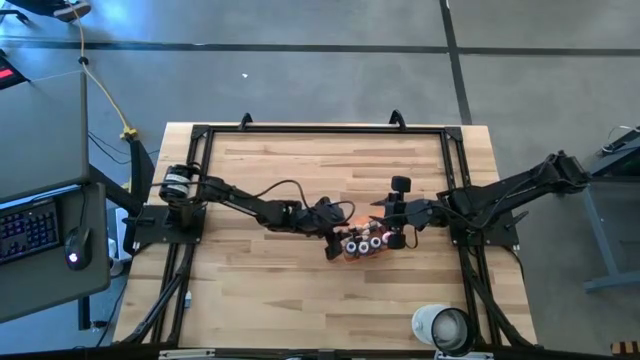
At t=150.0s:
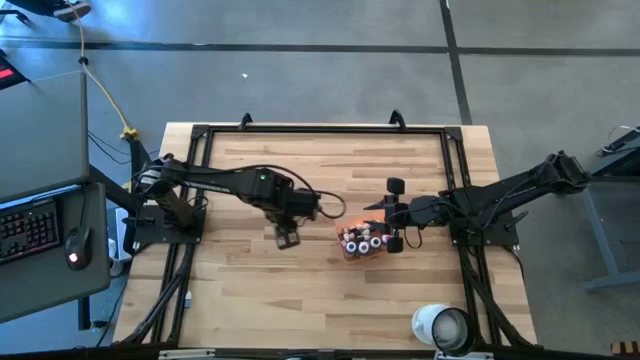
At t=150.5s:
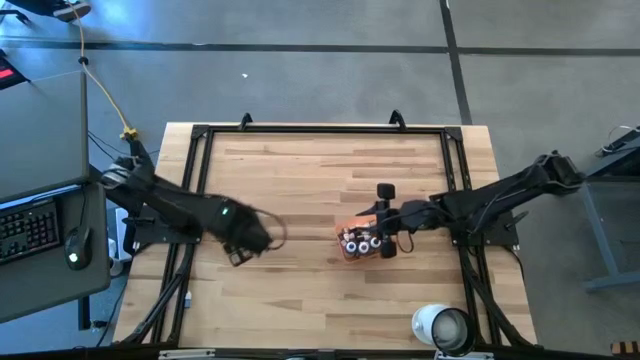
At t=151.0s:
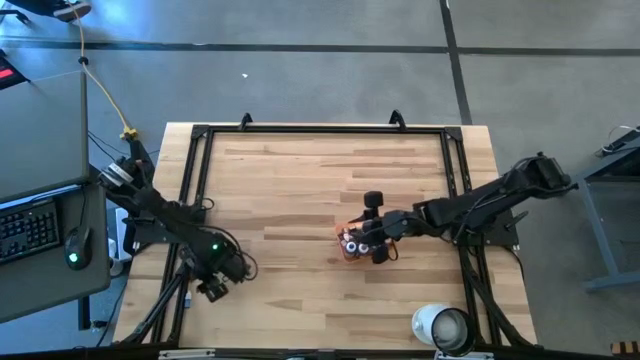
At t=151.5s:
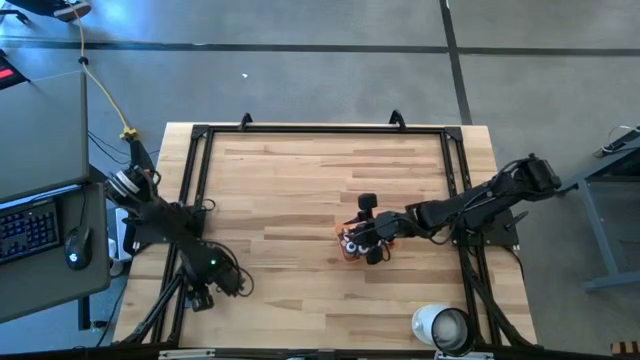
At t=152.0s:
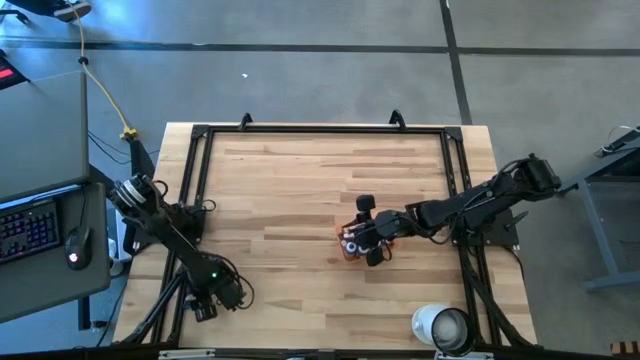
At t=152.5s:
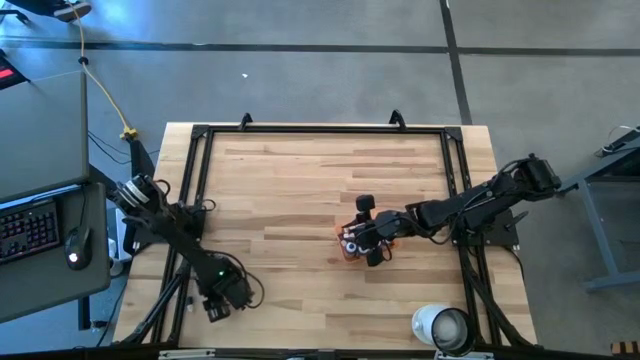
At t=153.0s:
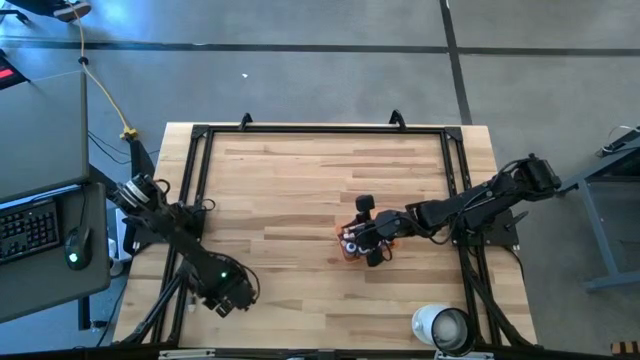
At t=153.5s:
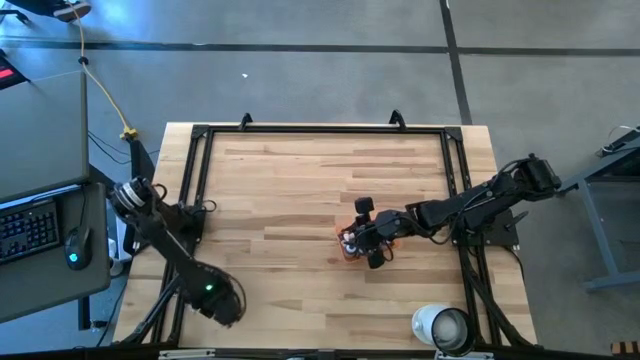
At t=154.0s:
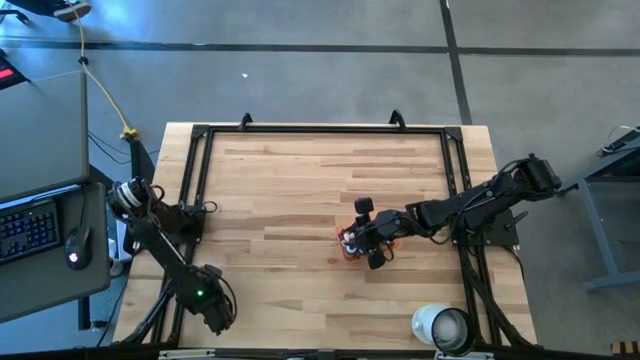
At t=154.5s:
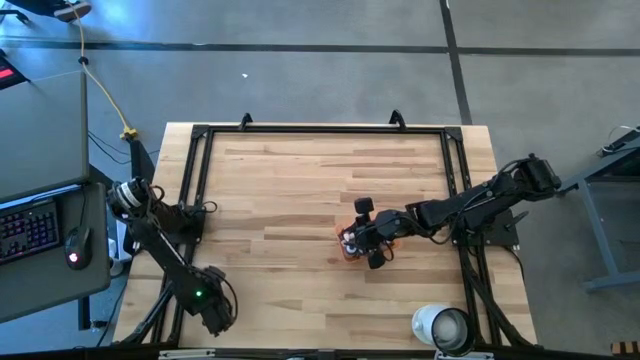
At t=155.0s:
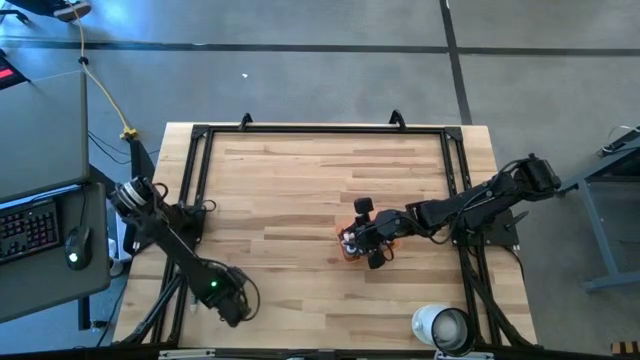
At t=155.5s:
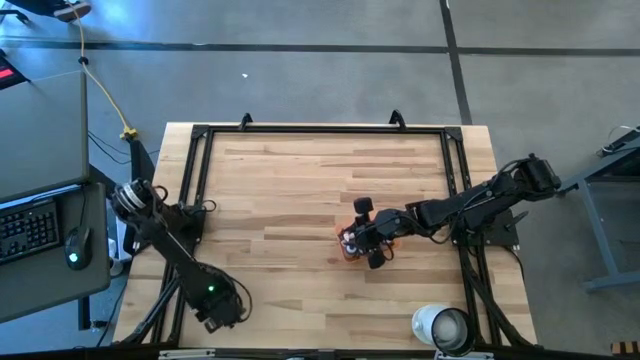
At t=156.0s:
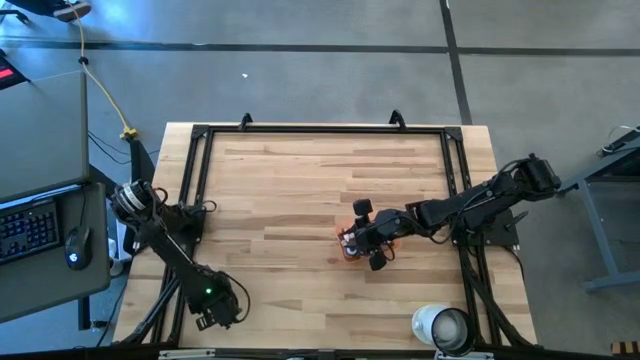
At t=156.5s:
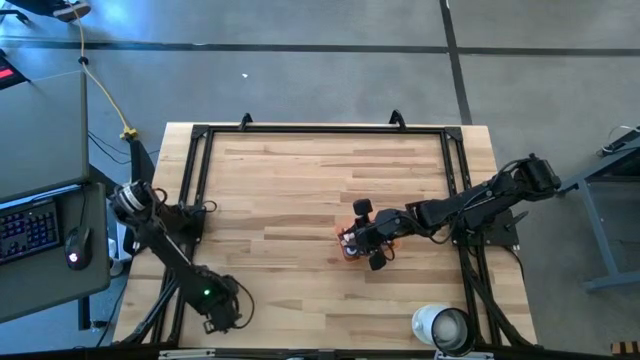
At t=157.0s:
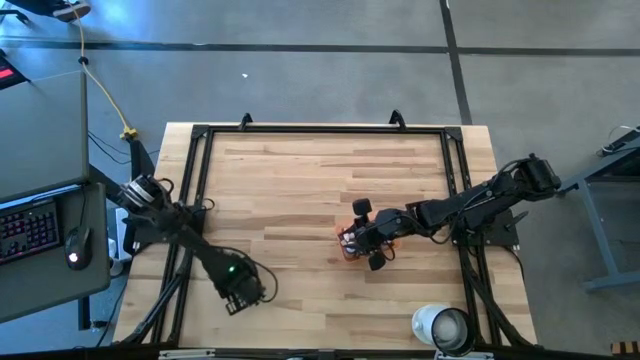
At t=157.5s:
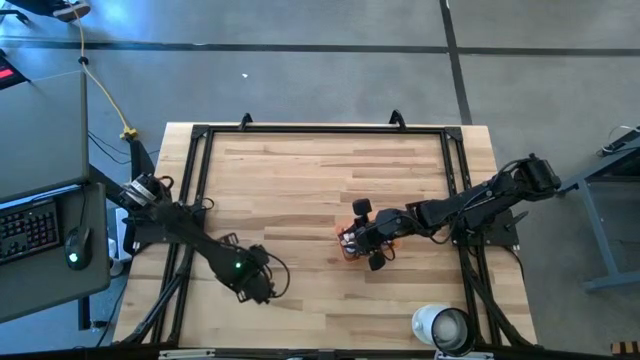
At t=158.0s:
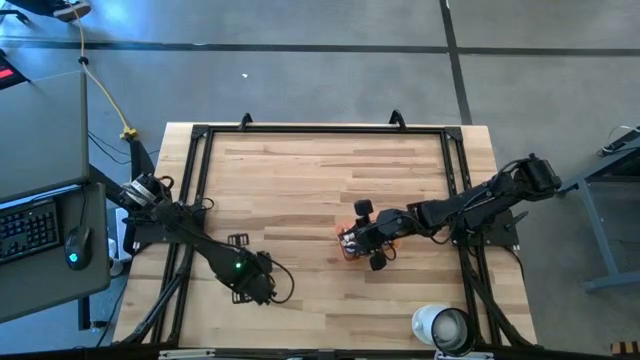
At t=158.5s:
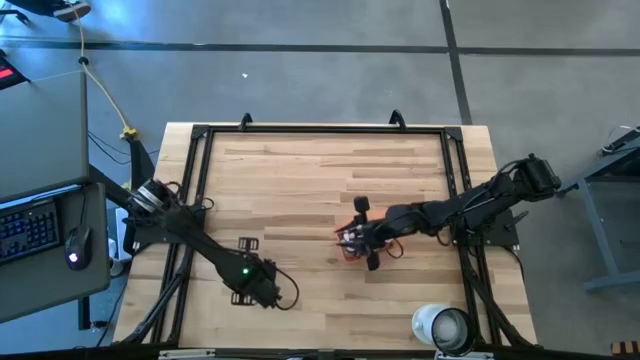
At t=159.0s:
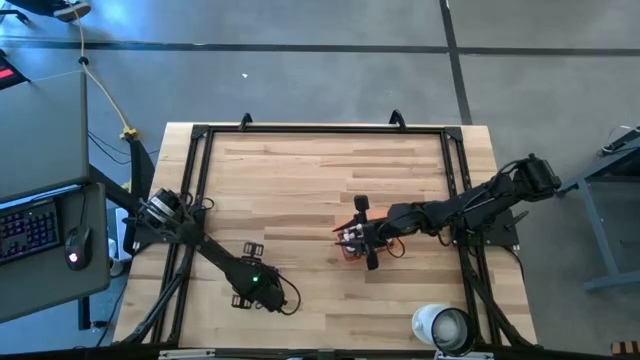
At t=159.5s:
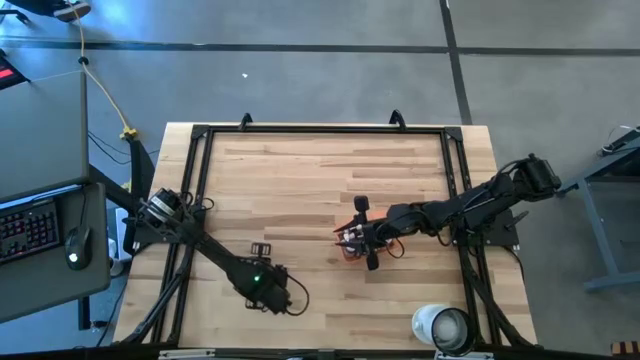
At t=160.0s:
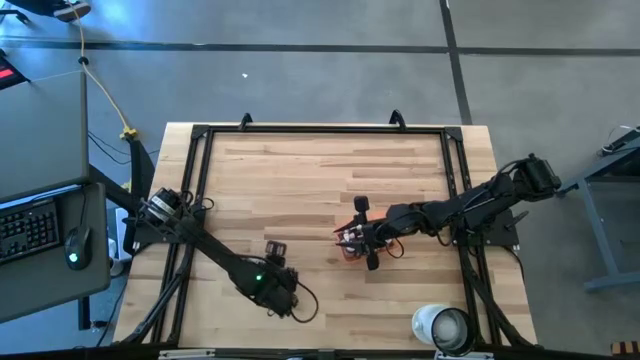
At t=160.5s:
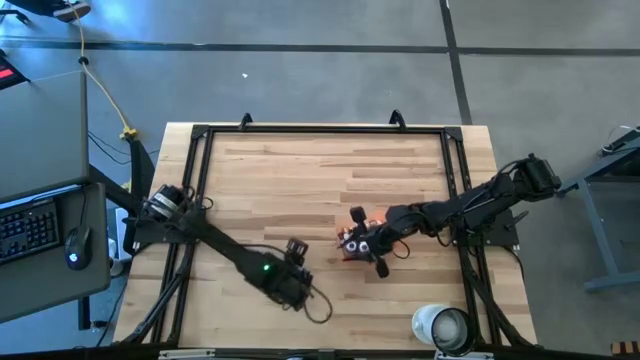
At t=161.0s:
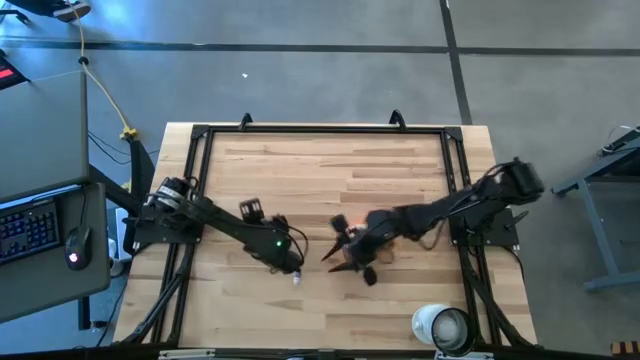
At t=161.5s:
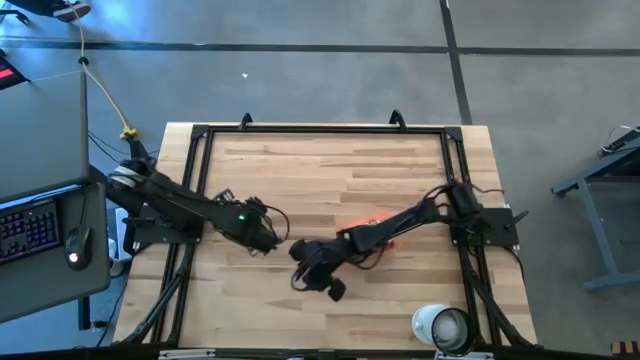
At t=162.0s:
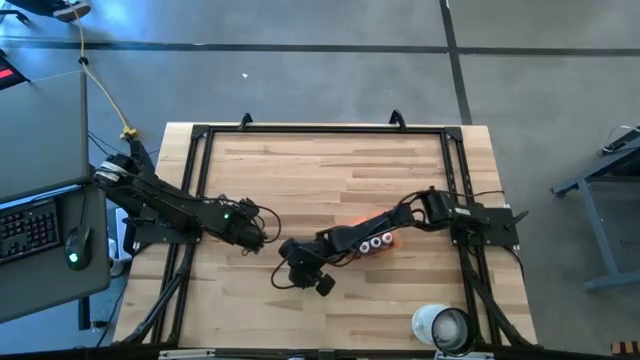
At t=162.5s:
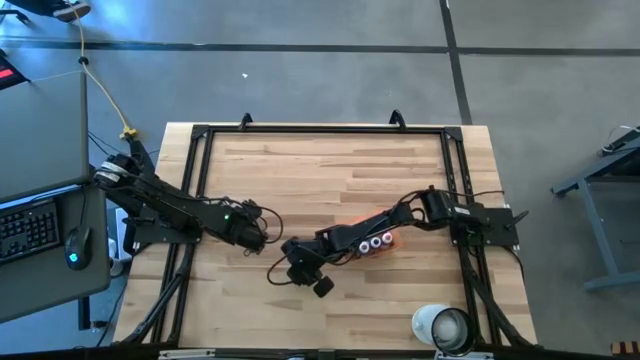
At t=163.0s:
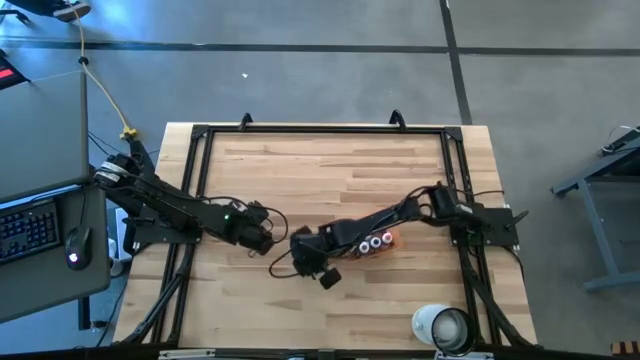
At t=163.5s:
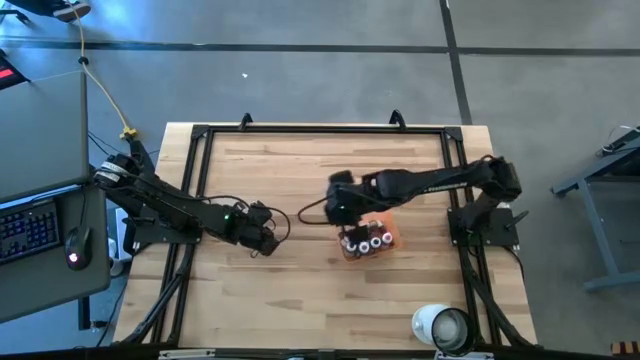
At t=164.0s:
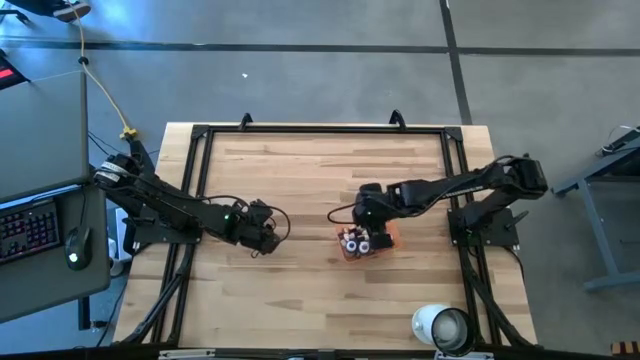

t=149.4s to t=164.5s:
Task: Pick & Place food coloring
Put the small blue food coloring bottle into the orange bin

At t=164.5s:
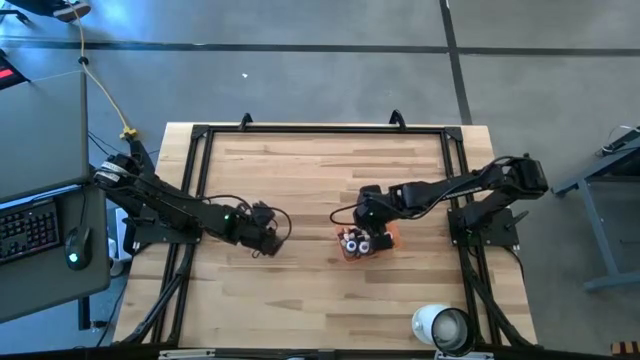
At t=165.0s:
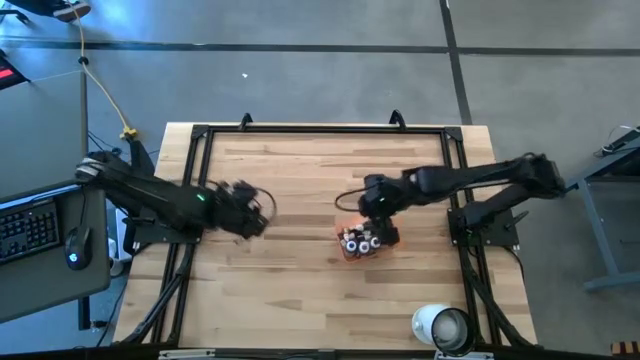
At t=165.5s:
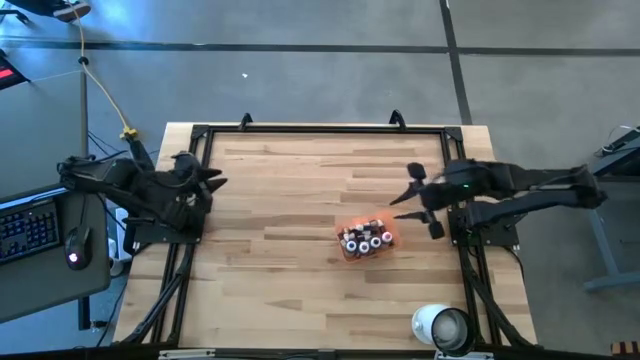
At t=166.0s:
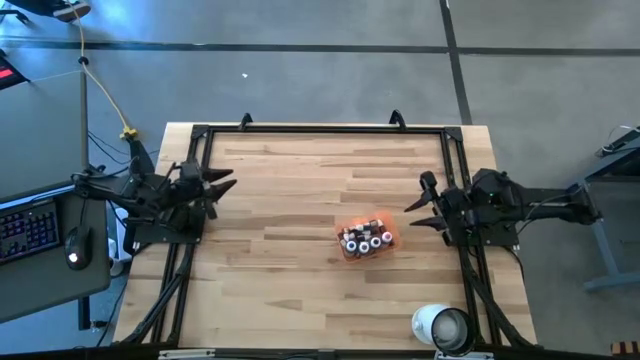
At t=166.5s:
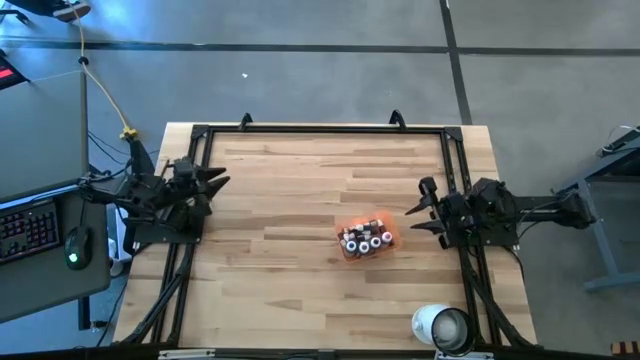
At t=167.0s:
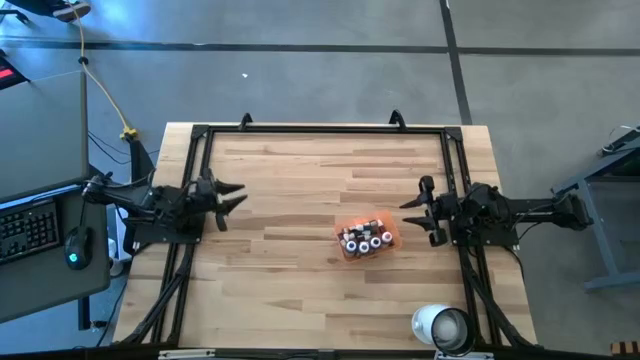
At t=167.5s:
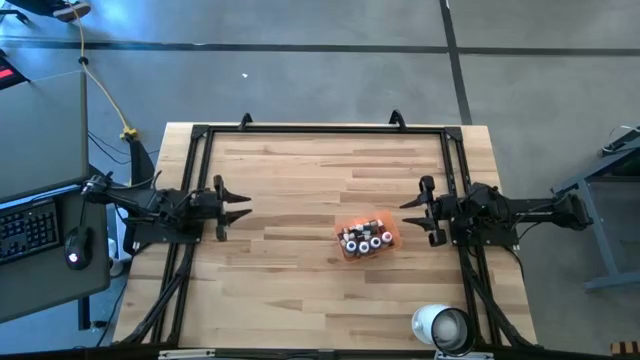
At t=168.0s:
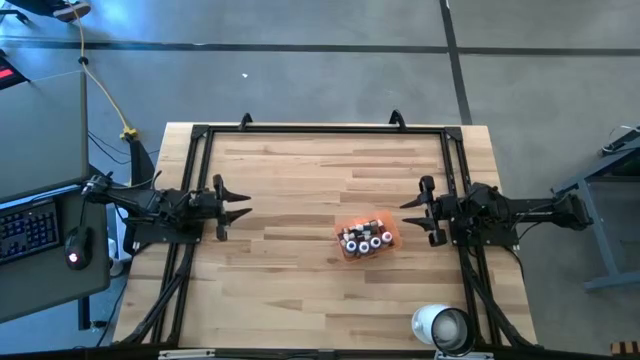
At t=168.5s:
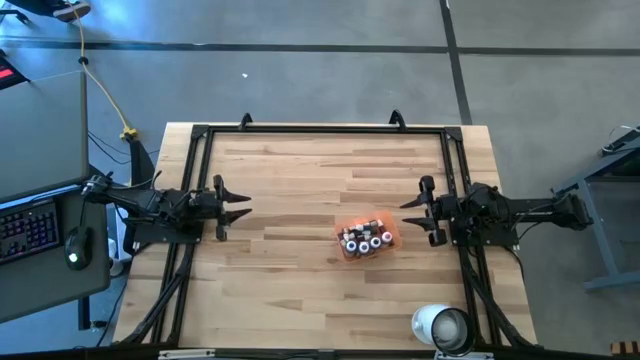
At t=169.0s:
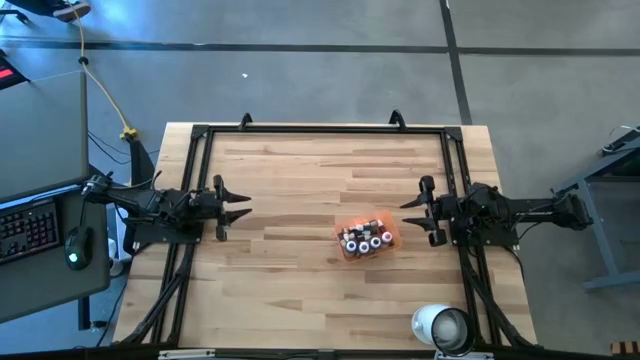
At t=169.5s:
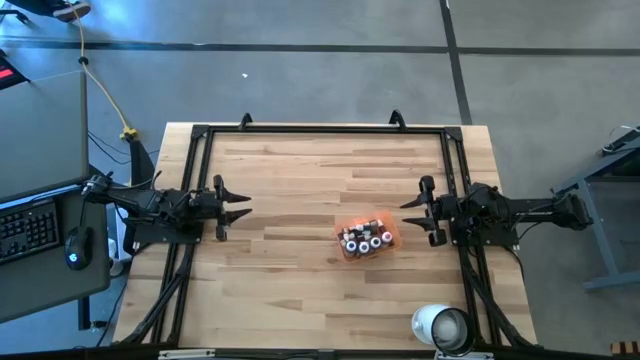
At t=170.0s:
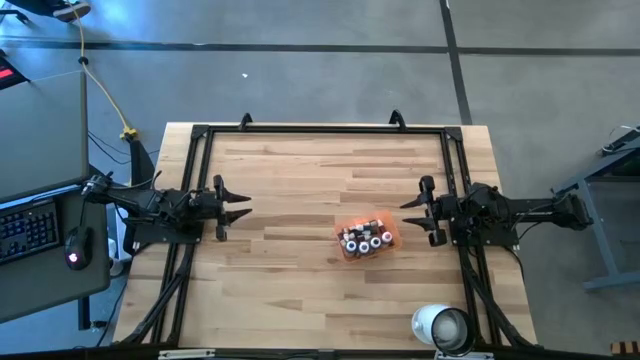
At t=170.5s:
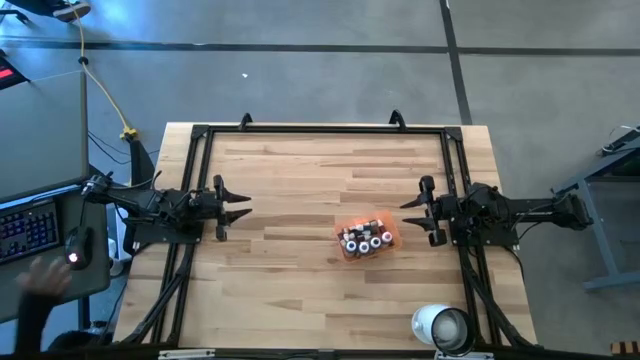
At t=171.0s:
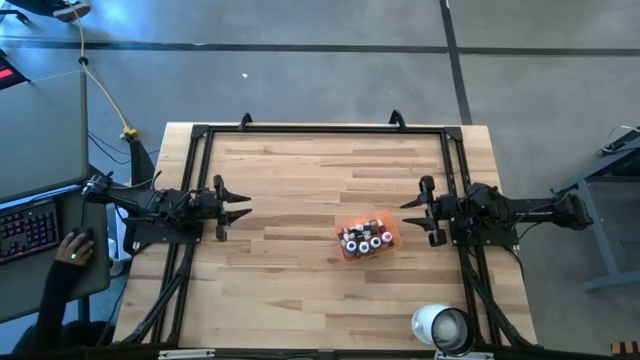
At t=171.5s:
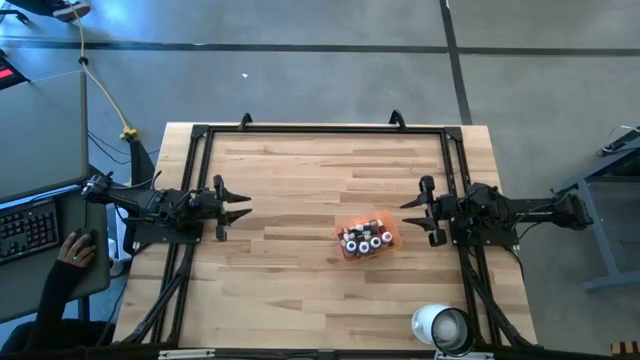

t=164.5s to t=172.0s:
Return to Home Position
